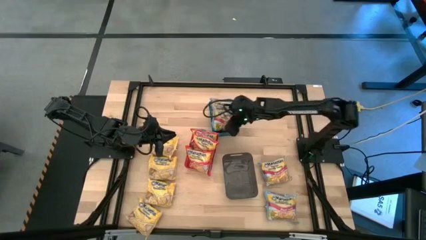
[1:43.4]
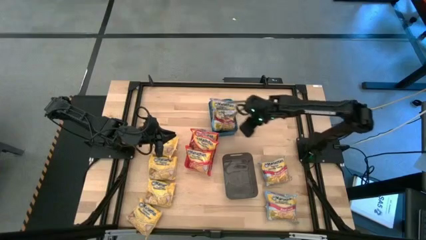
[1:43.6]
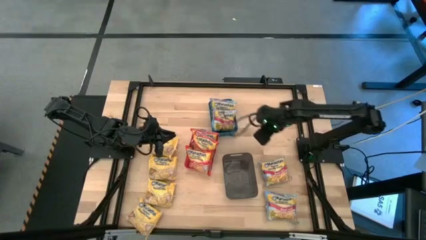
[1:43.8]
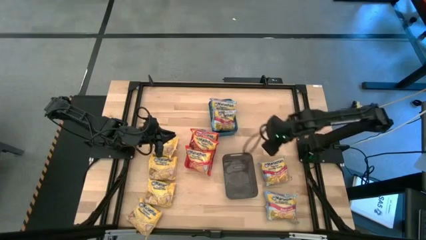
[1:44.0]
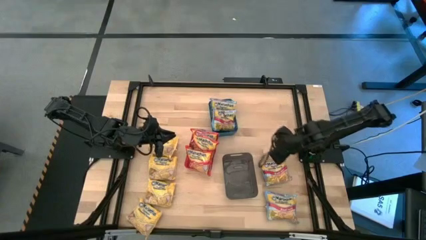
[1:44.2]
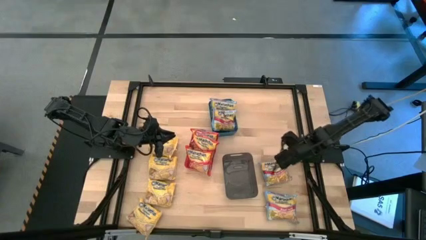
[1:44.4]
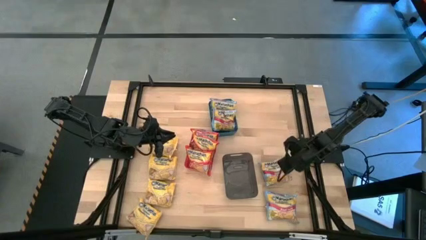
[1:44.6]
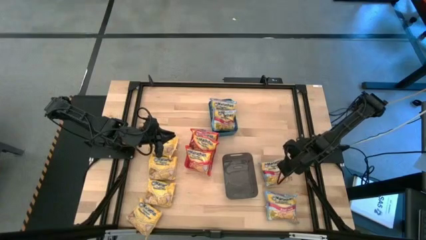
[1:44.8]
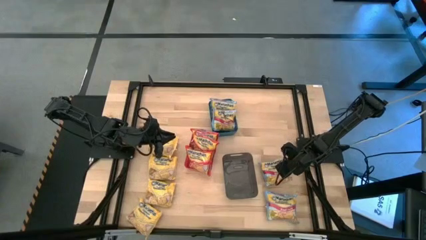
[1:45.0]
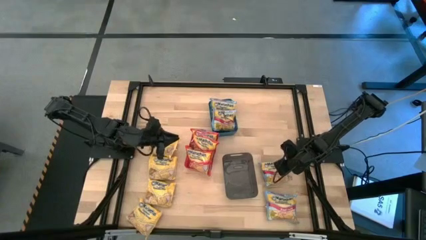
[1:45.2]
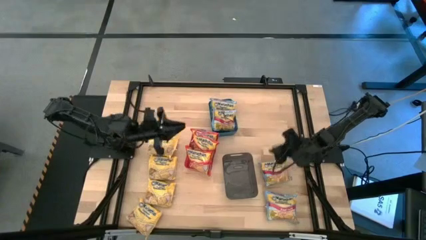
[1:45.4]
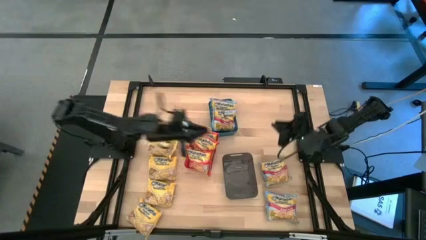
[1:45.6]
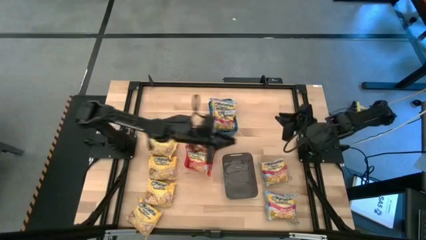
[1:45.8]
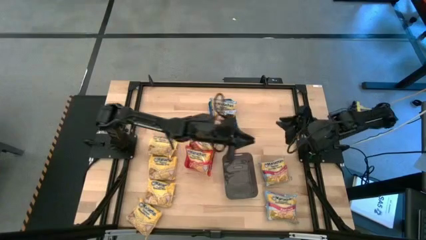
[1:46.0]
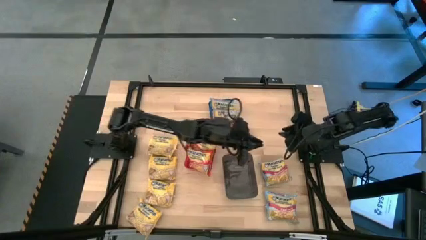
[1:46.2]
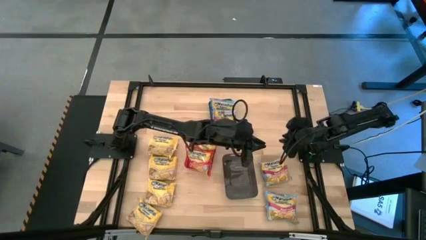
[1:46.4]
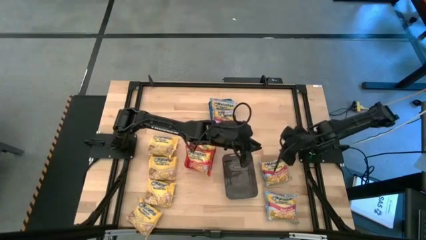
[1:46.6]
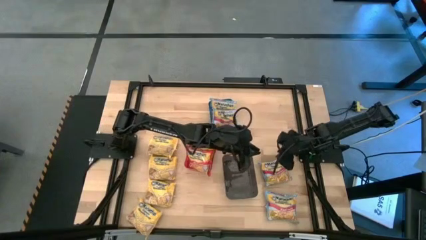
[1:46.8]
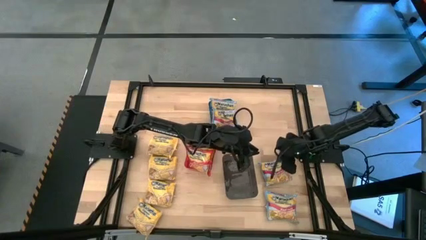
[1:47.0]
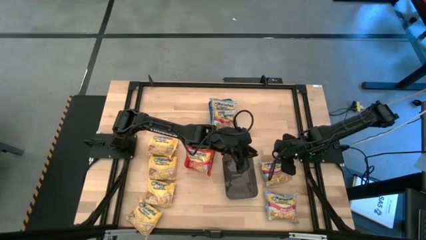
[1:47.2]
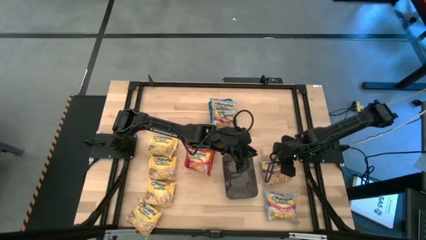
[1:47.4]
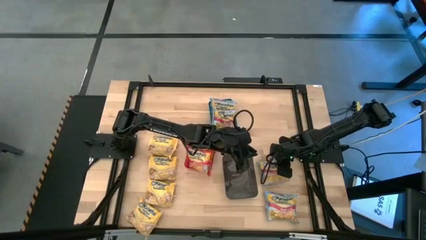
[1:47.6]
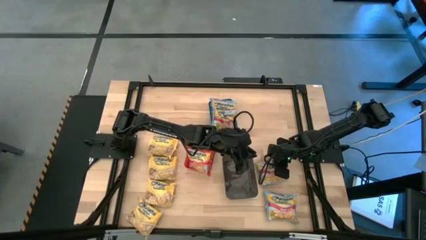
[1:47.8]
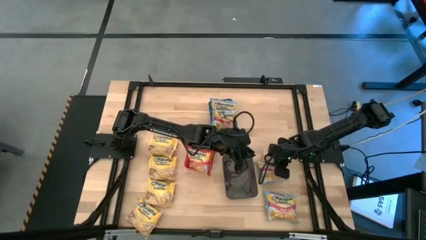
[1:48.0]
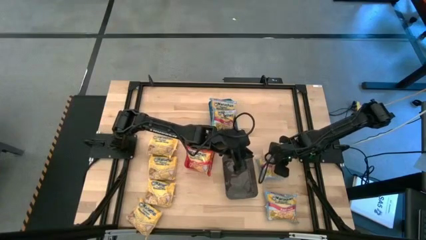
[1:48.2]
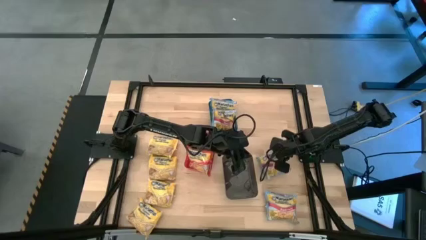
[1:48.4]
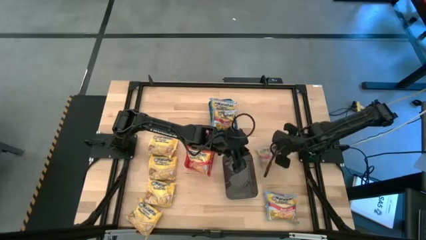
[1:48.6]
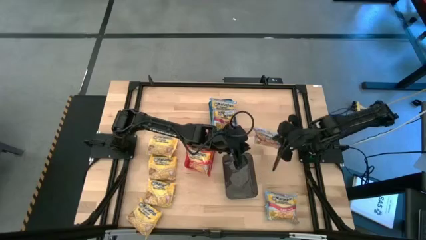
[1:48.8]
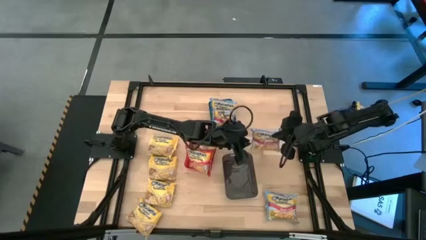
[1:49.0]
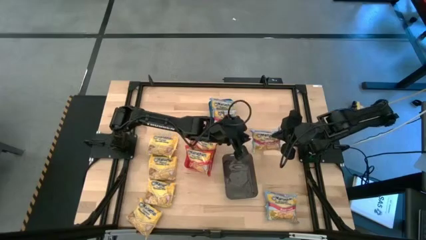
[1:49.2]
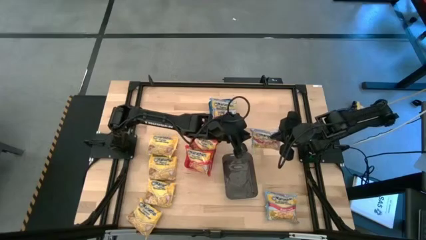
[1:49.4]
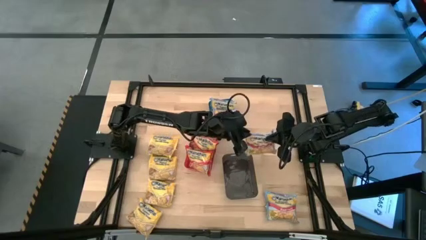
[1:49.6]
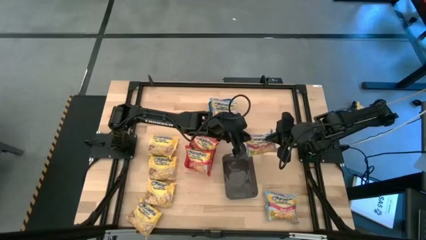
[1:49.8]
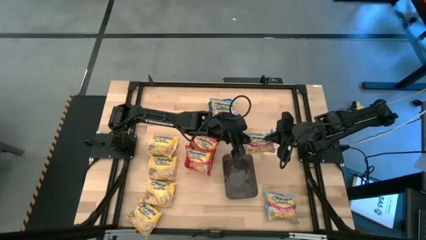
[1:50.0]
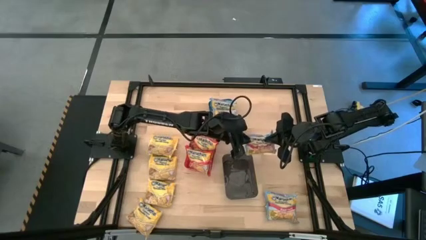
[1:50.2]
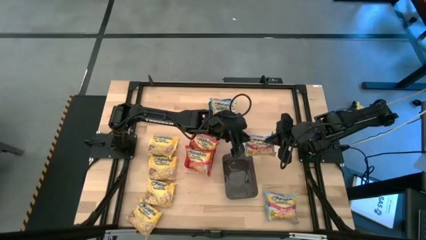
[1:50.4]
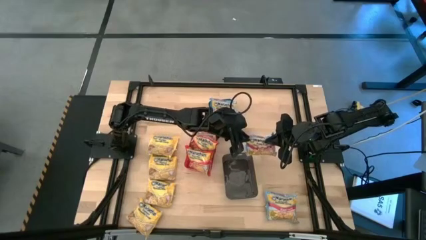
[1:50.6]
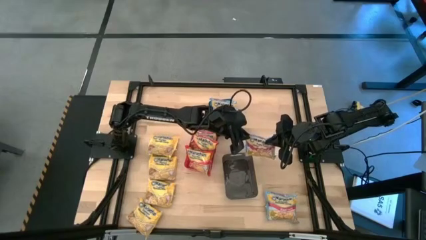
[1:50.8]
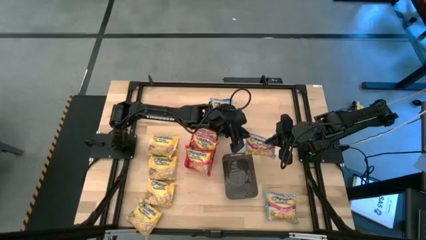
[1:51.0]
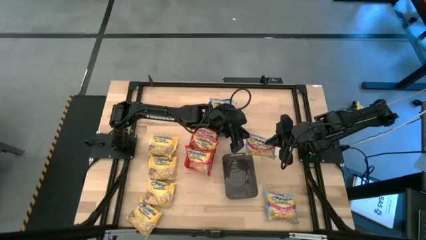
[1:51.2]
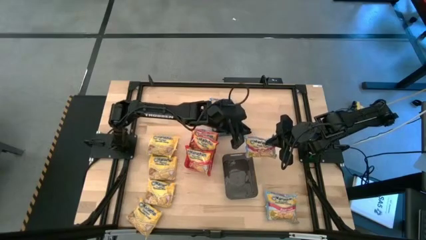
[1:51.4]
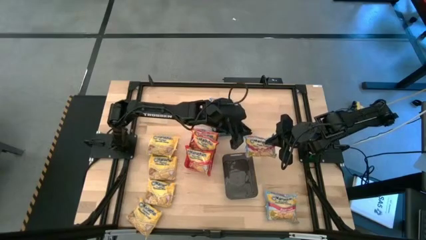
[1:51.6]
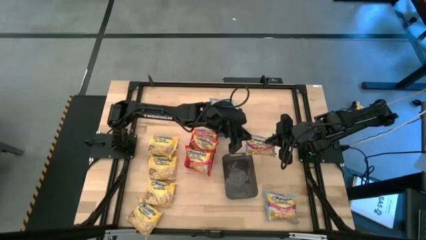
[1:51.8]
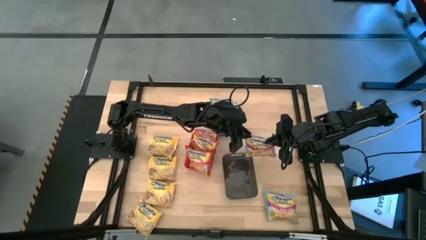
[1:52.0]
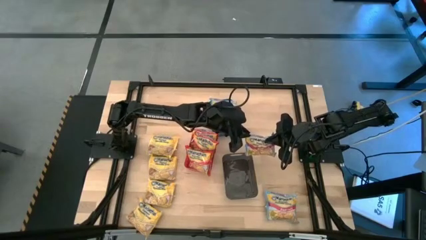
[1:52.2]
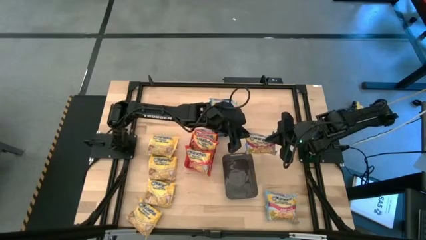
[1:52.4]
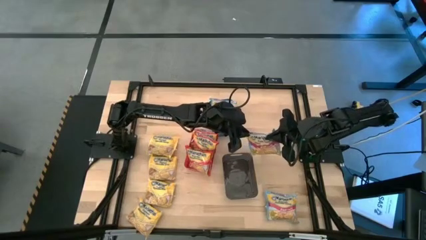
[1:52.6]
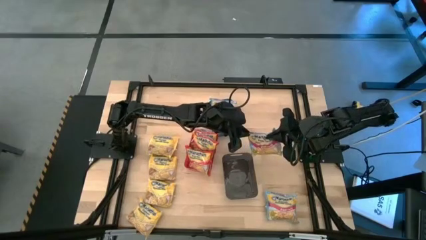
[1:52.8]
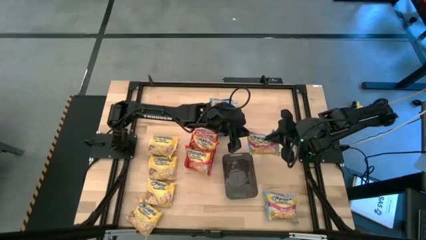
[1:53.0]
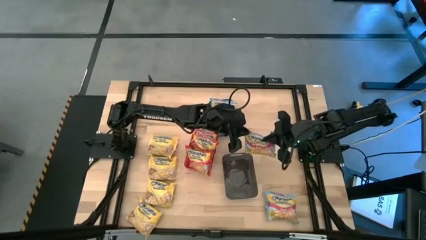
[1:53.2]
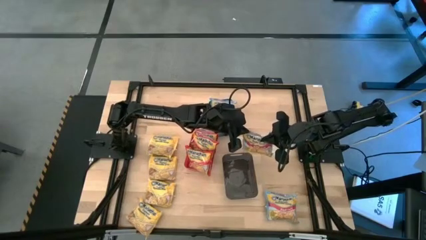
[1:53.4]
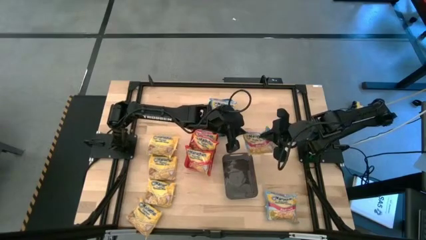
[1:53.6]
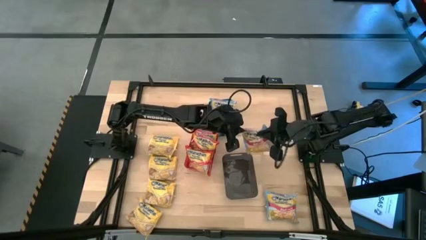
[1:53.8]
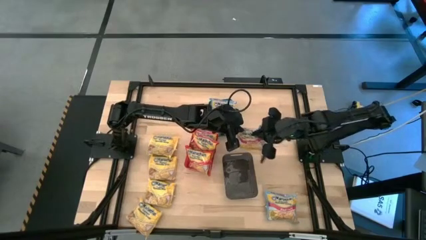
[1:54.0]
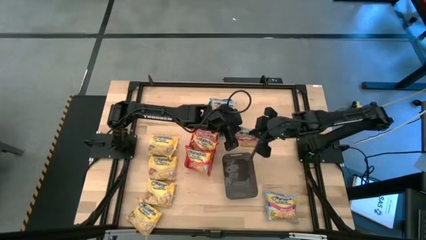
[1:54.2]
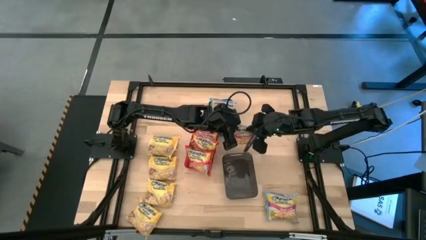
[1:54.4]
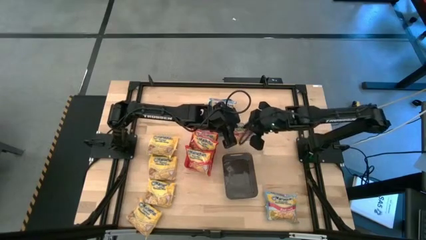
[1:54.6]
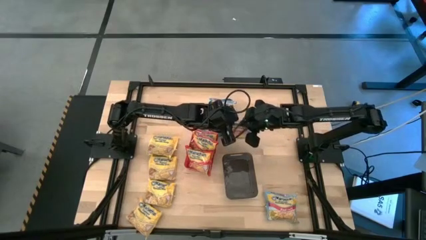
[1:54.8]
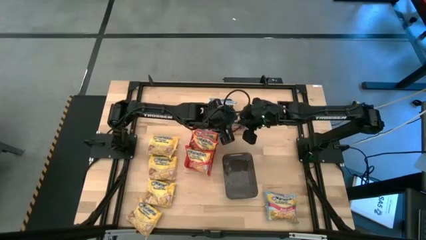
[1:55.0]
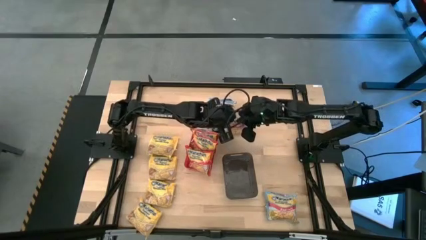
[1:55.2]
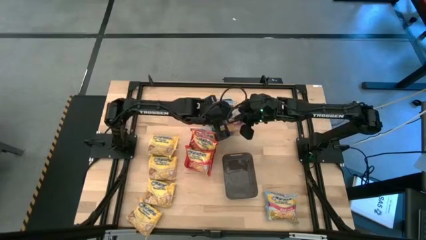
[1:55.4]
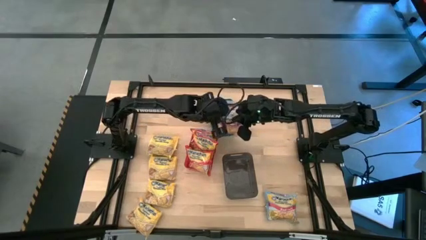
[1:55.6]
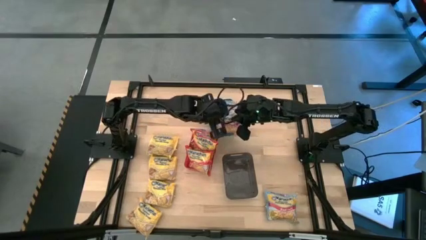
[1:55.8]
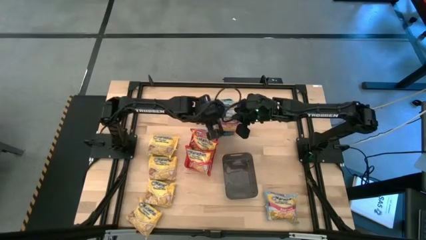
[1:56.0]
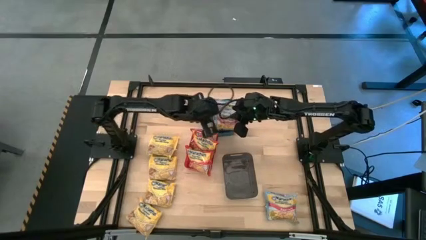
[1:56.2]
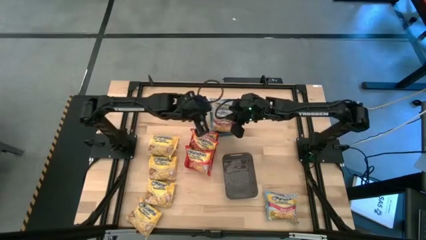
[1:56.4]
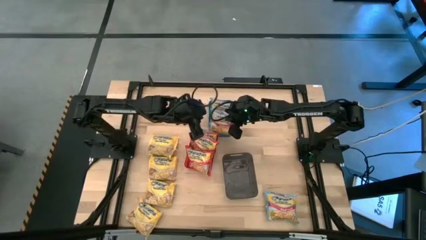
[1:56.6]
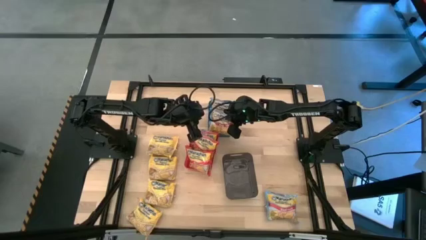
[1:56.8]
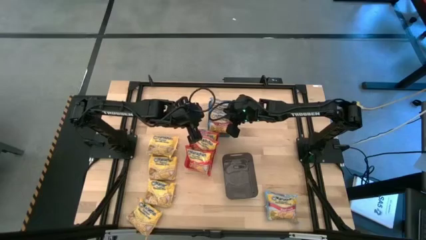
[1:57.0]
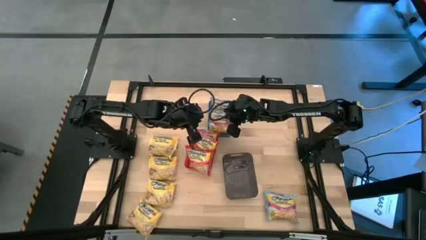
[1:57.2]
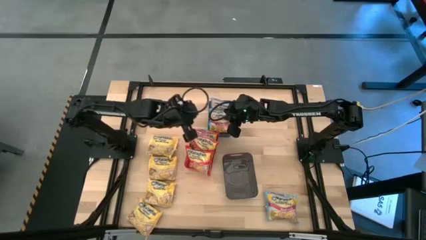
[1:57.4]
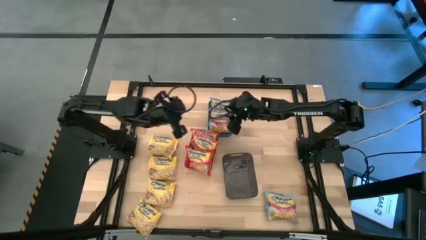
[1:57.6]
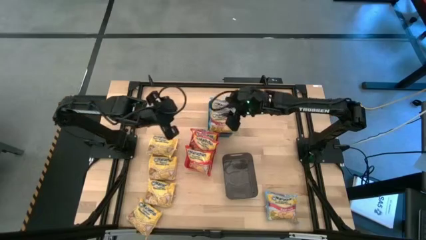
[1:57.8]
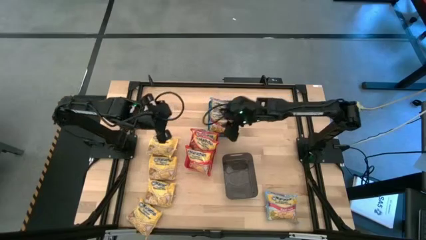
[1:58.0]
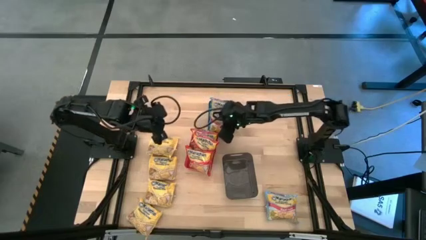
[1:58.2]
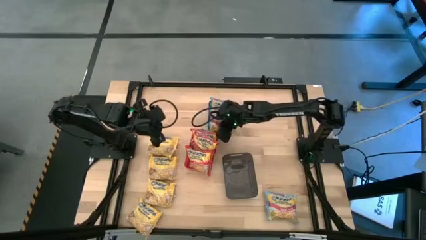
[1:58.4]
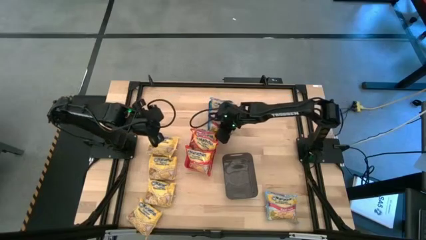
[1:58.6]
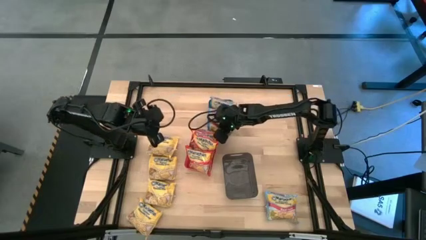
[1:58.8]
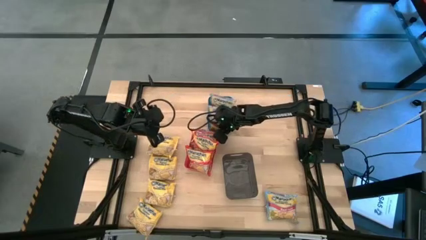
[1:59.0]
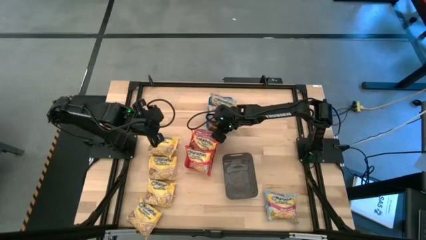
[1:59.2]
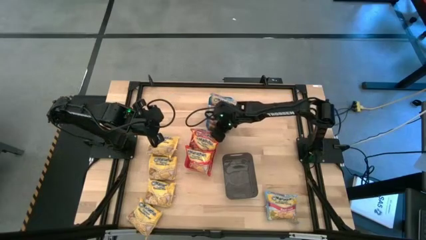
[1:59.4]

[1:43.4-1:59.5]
Task: Sort Maruchan noodles
Put the blue bag into the blue bin
